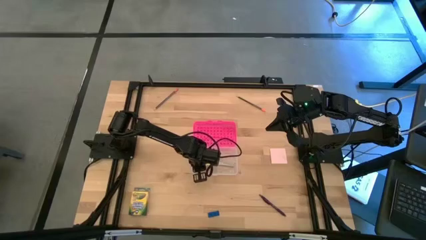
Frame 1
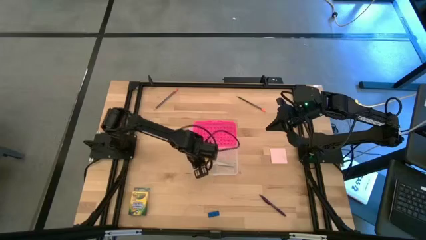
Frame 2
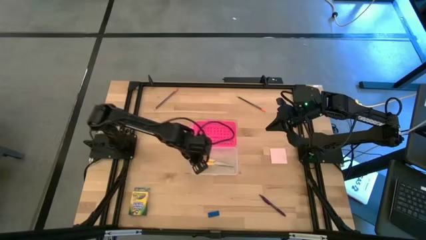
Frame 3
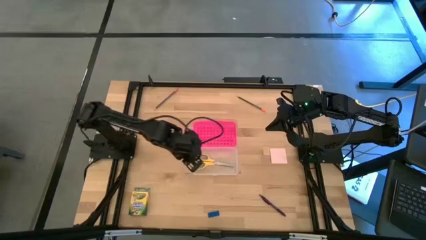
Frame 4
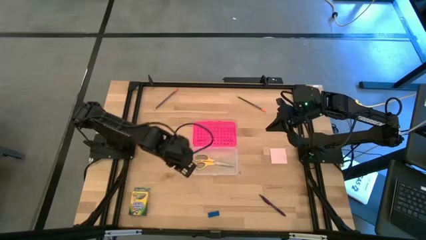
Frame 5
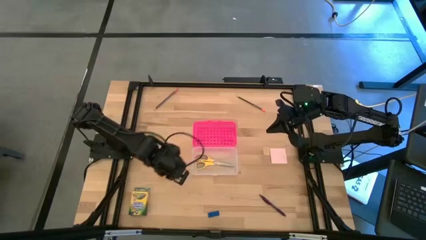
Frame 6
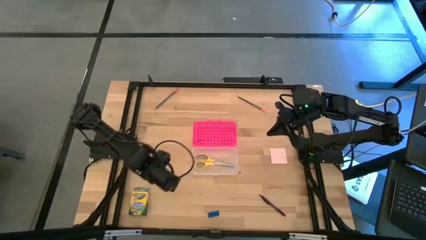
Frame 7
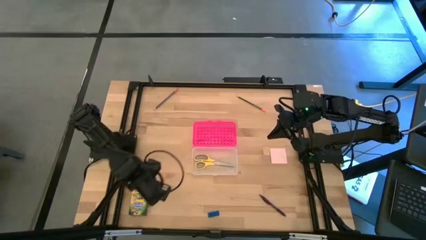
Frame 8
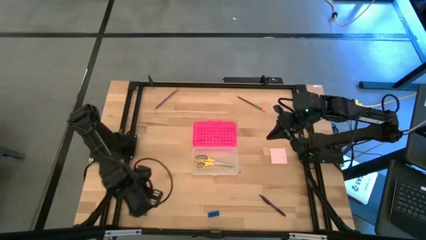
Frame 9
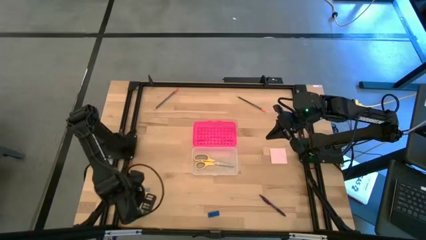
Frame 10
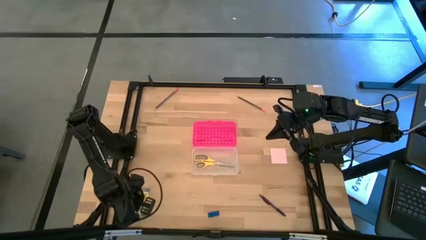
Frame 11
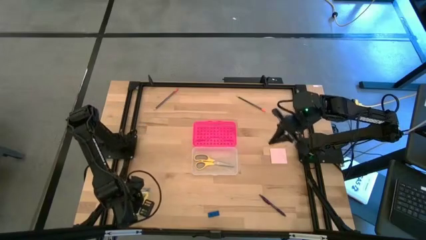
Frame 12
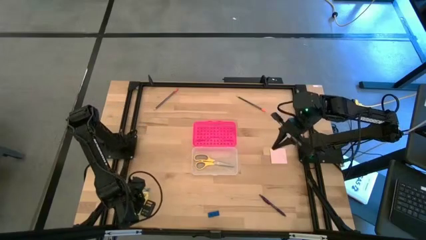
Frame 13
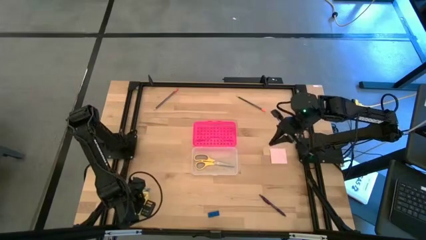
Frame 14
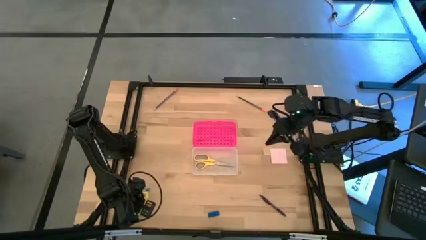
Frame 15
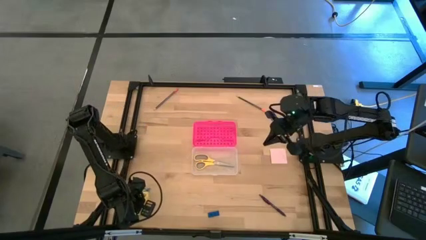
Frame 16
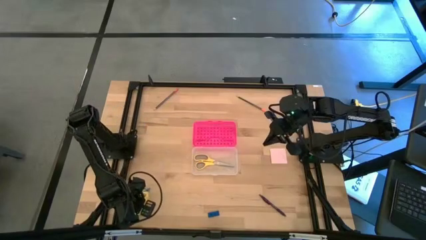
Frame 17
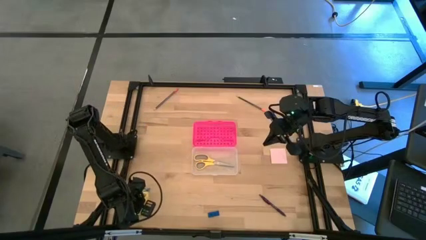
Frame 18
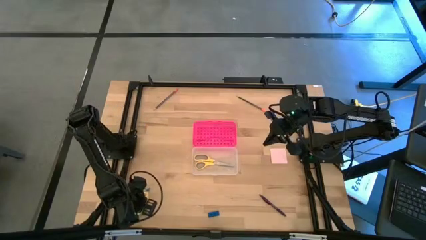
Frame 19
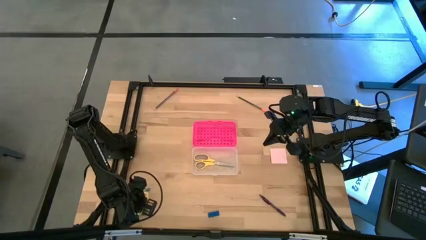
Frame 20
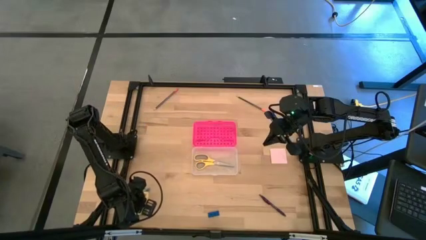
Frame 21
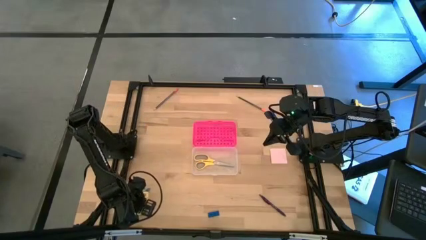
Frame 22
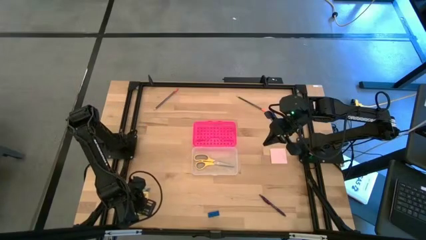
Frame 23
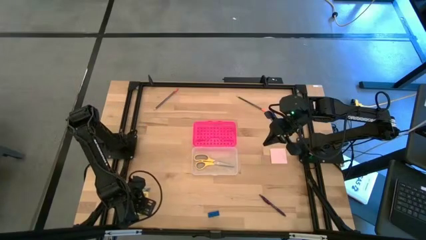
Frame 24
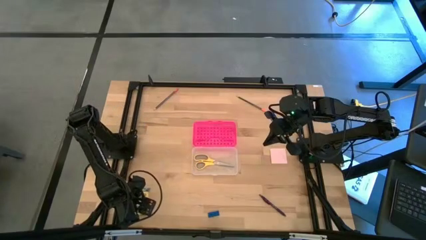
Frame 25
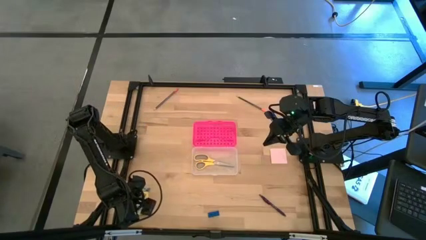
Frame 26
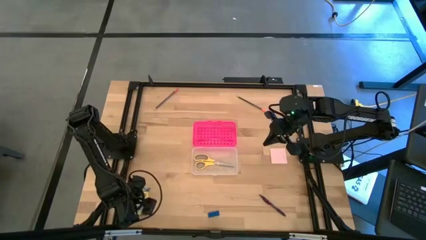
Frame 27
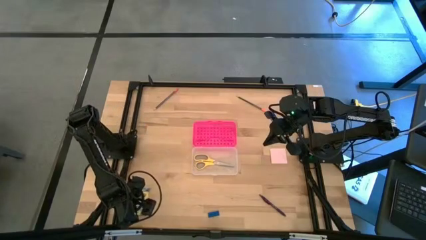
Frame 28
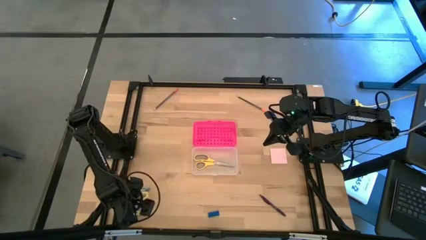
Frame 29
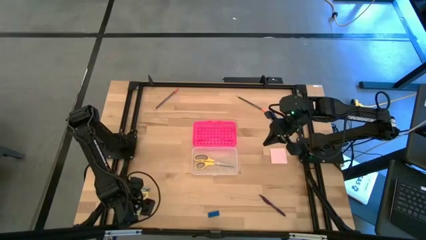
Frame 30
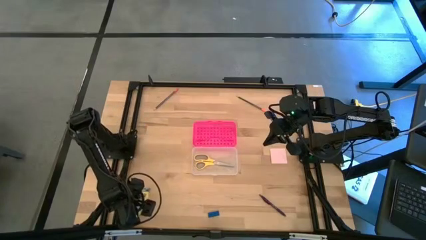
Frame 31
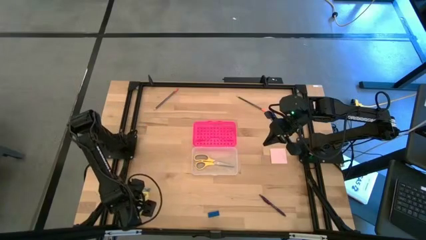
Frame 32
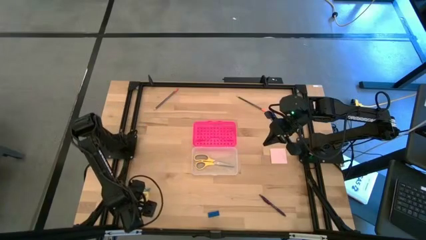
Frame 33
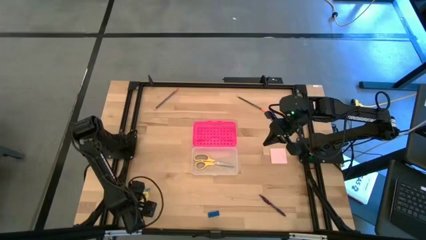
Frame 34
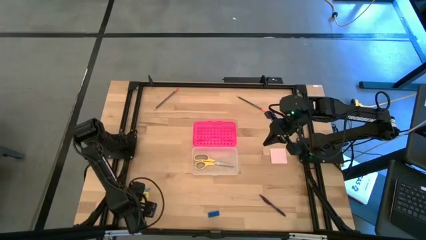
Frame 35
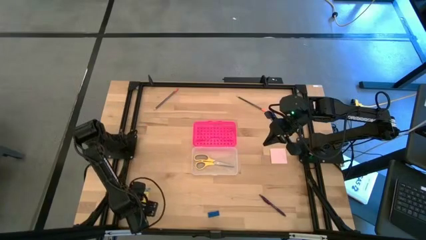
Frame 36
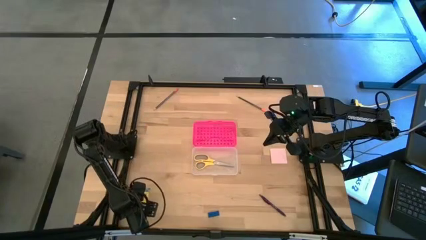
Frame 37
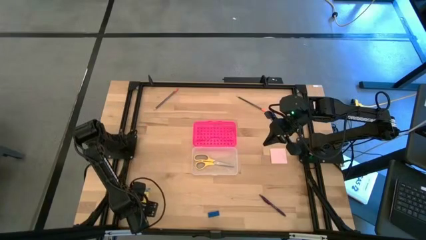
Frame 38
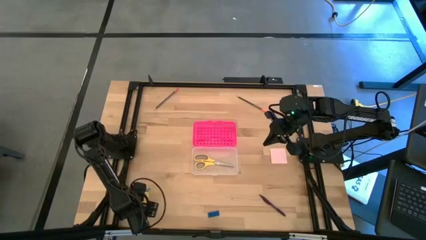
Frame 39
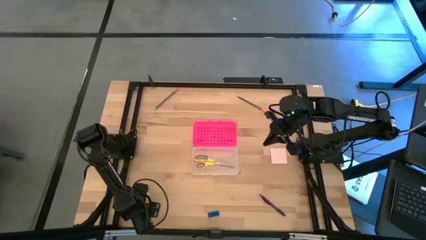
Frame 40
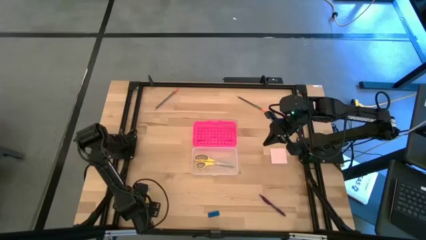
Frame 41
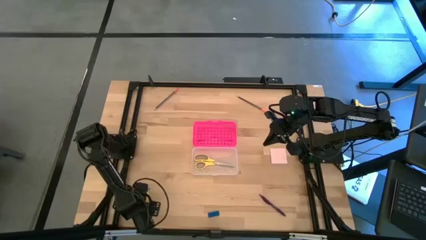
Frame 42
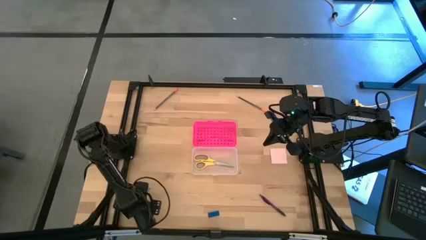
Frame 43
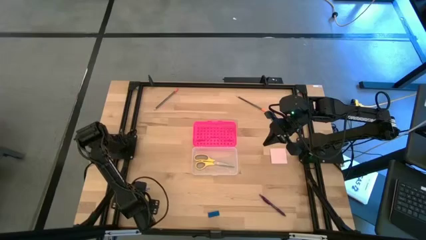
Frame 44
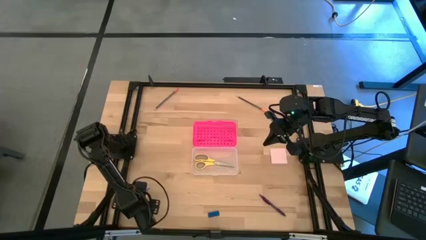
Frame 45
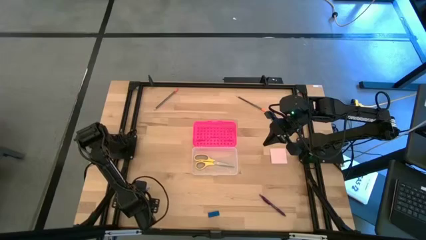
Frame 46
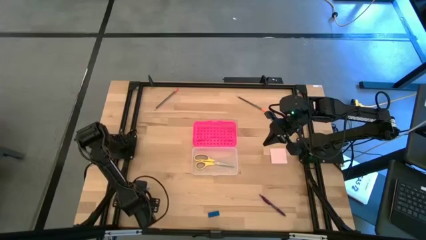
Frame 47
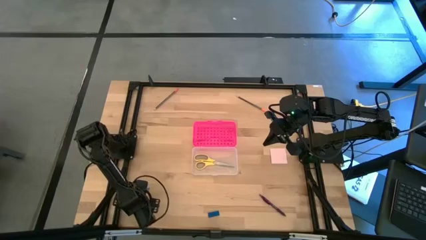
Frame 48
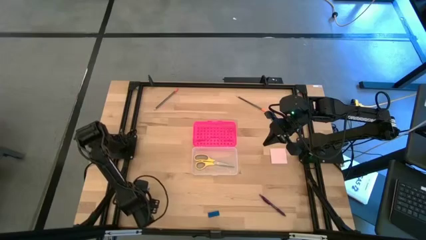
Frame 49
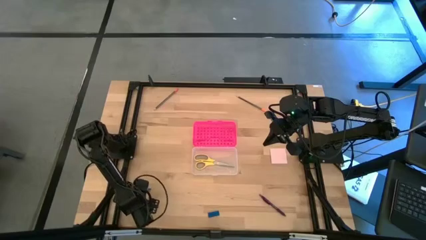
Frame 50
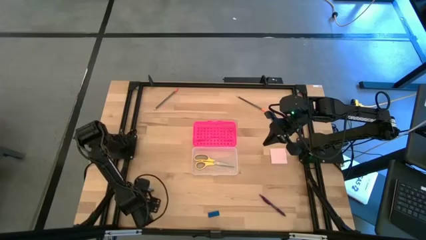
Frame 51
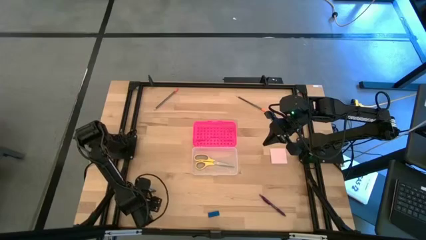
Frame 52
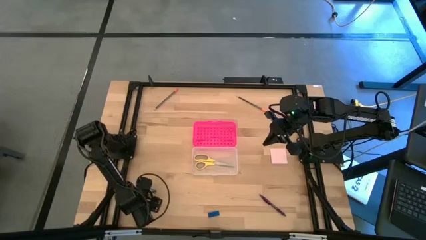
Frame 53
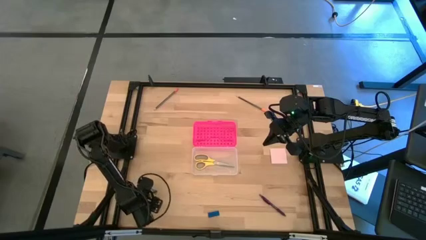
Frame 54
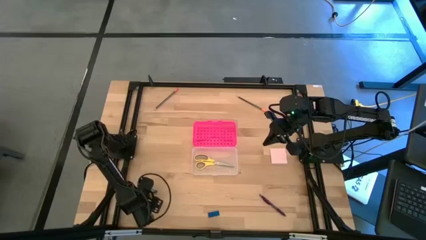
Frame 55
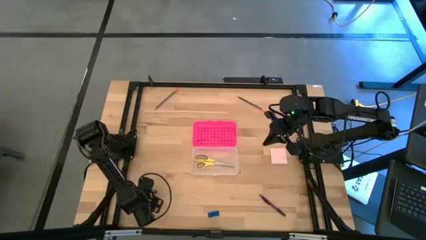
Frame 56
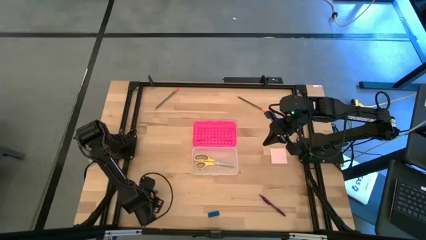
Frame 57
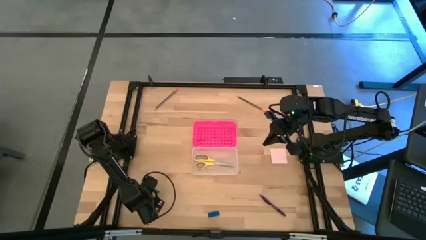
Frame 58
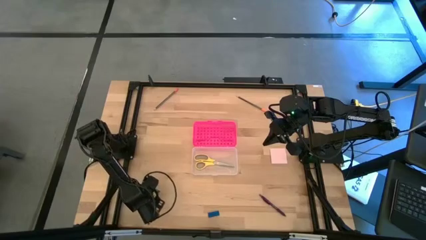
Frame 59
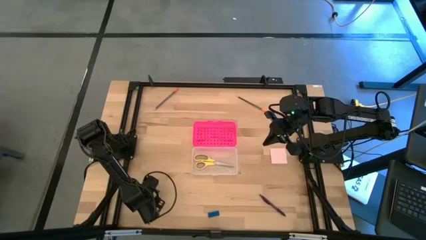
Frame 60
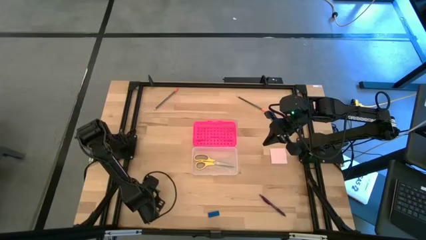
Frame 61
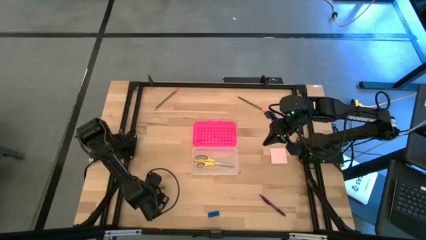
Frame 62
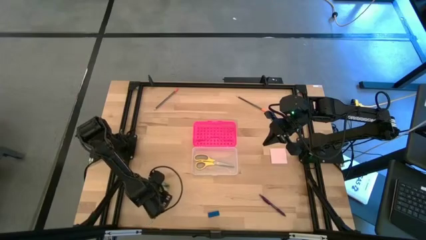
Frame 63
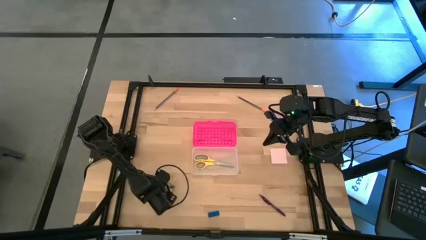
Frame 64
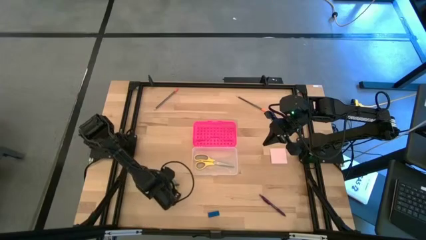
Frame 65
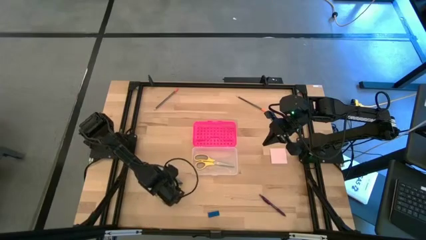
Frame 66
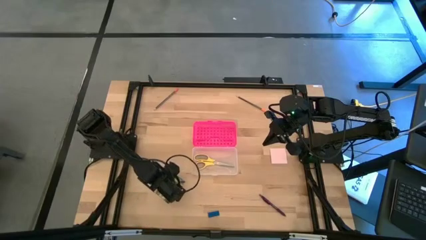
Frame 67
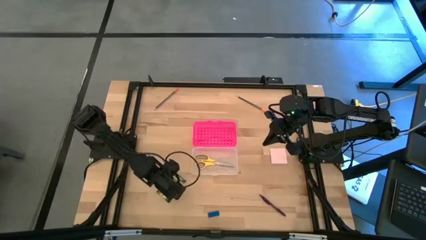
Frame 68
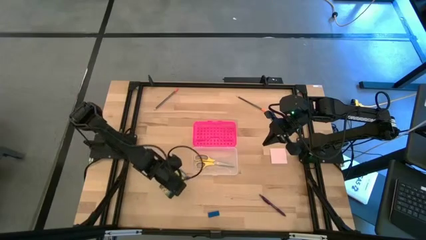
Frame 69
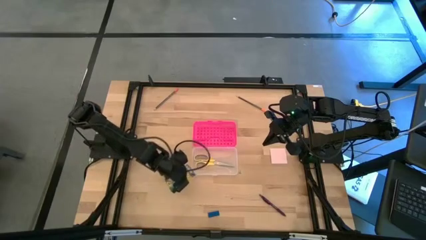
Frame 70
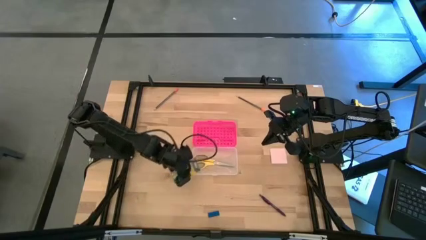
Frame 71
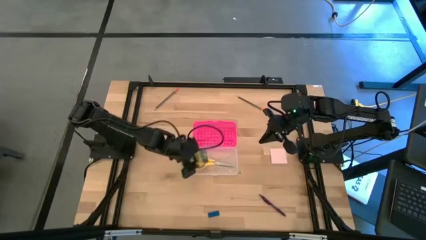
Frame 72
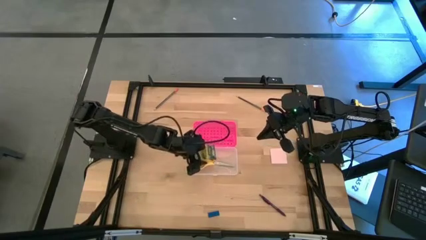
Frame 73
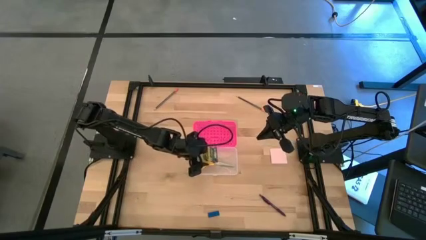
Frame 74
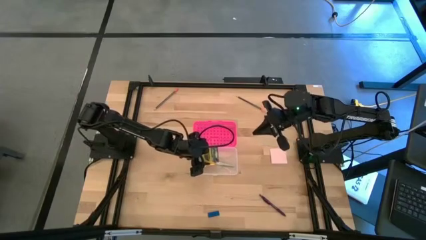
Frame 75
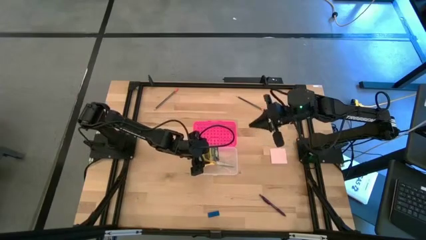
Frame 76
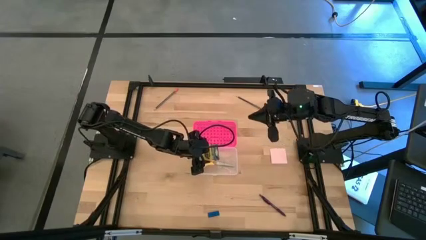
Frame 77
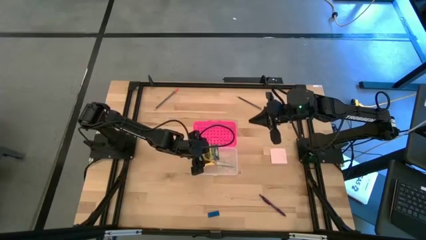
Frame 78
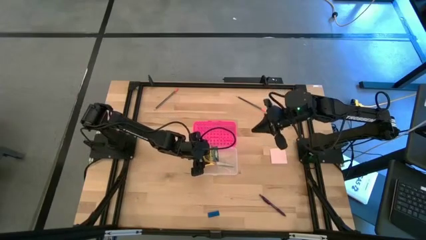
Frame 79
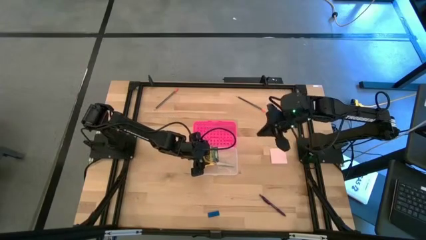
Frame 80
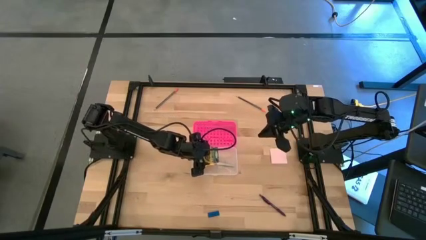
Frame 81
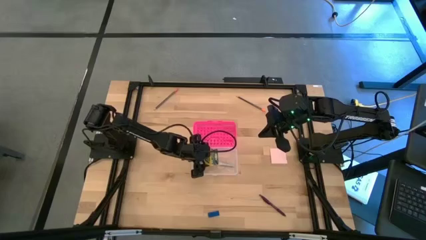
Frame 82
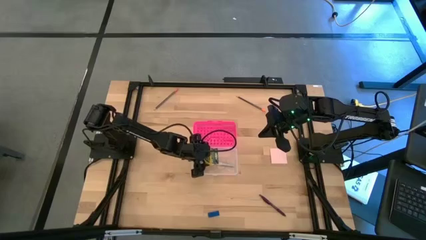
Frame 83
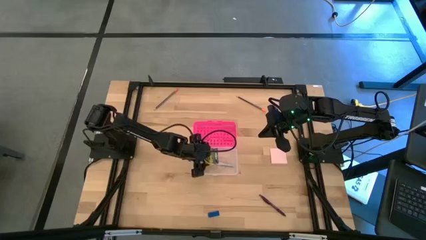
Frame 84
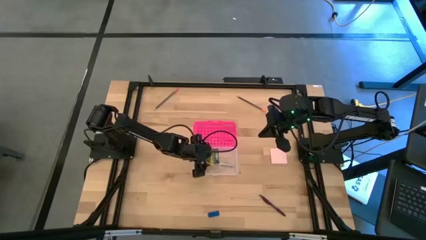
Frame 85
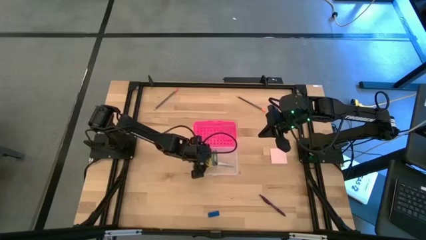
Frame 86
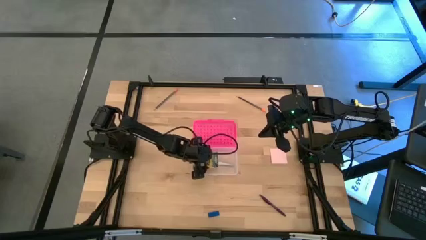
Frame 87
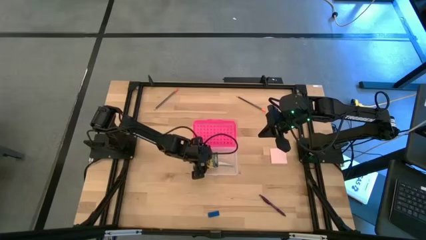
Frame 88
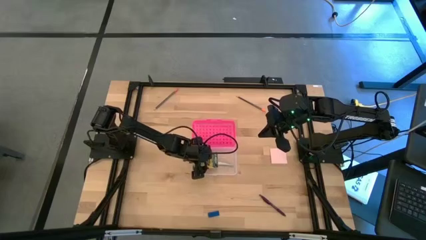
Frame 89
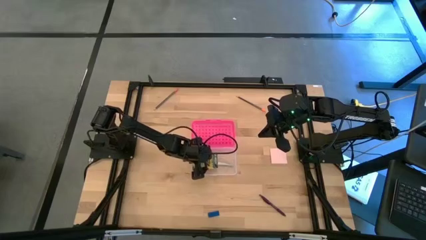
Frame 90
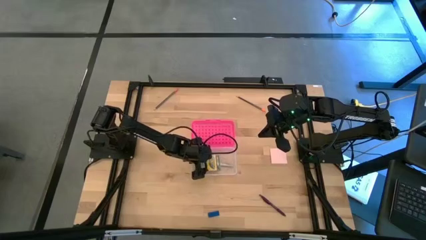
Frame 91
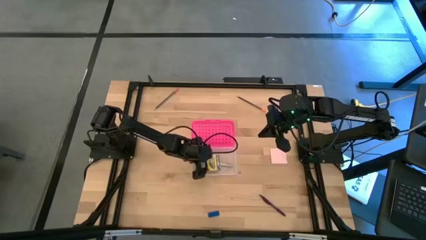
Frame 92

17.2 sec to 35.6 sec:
Task: Pack school essentials
Put the box of crayons into the pencil case
